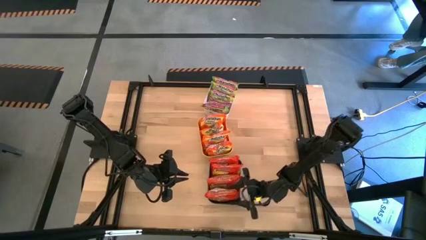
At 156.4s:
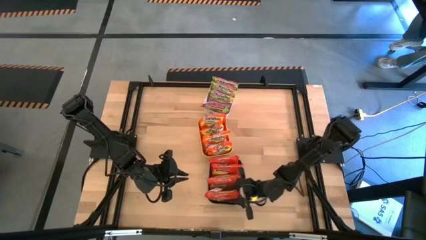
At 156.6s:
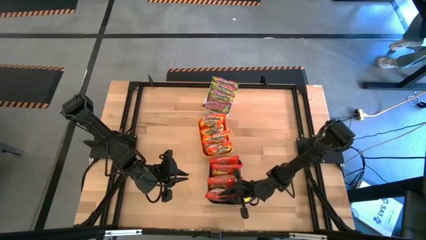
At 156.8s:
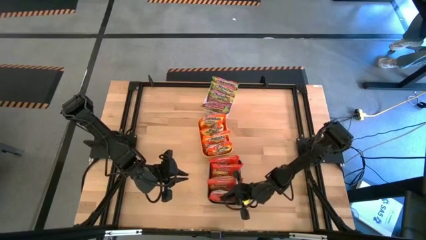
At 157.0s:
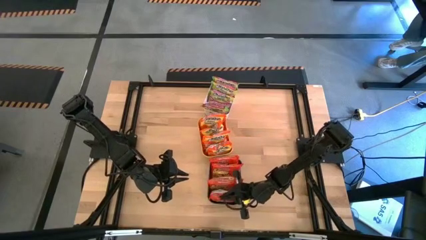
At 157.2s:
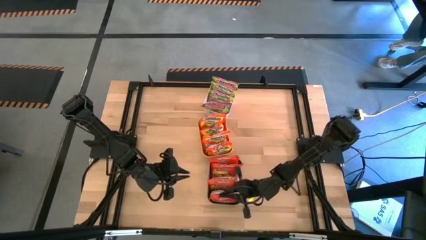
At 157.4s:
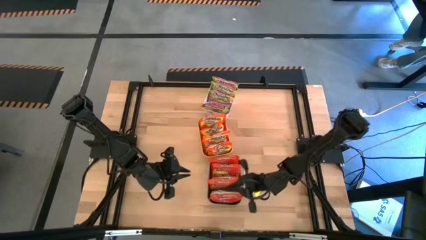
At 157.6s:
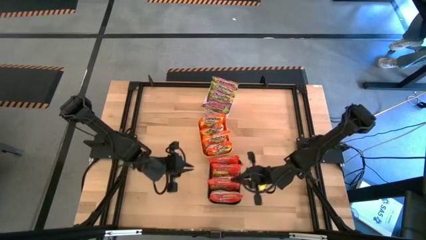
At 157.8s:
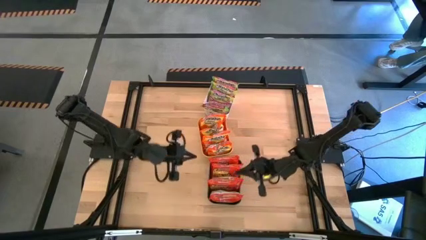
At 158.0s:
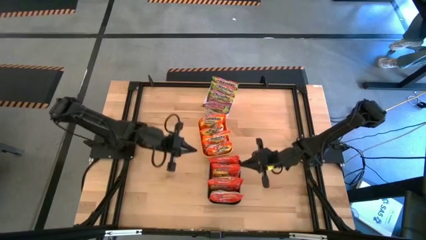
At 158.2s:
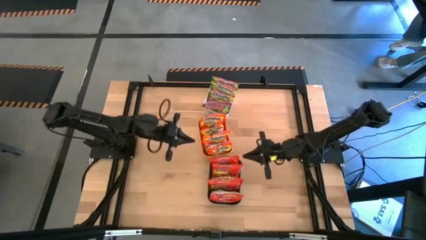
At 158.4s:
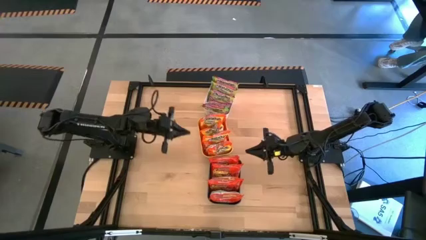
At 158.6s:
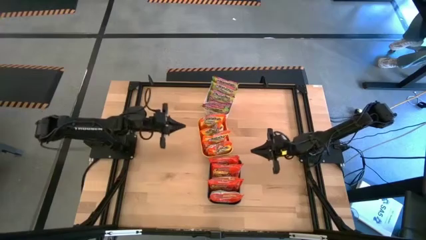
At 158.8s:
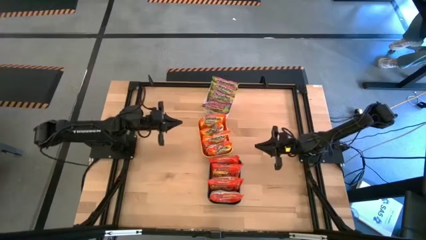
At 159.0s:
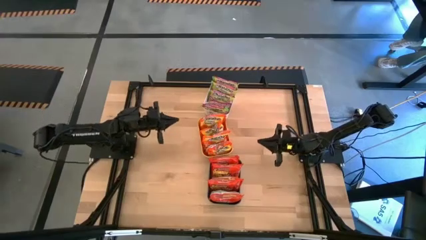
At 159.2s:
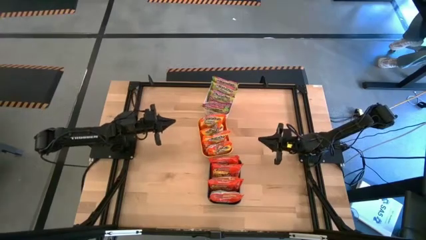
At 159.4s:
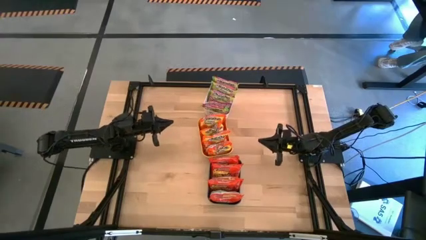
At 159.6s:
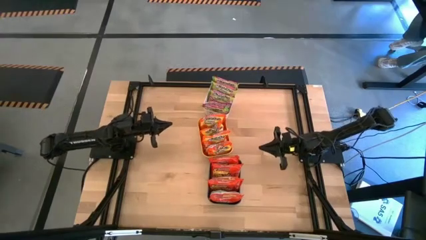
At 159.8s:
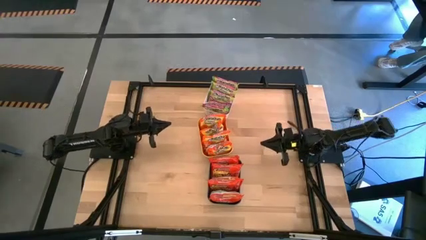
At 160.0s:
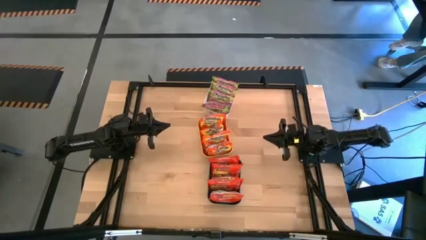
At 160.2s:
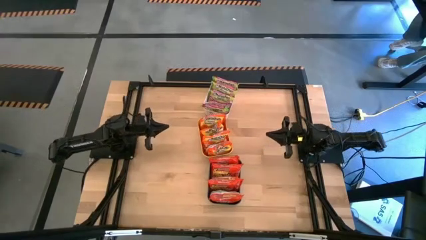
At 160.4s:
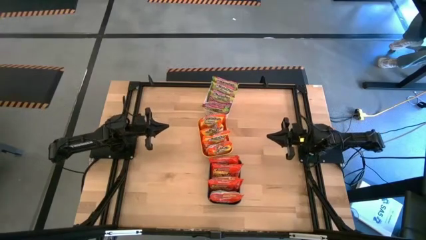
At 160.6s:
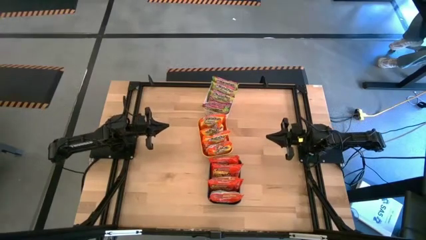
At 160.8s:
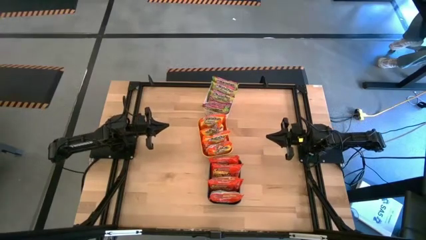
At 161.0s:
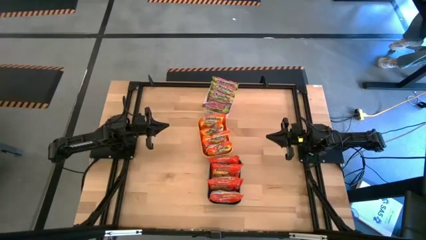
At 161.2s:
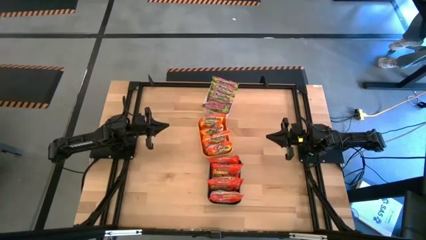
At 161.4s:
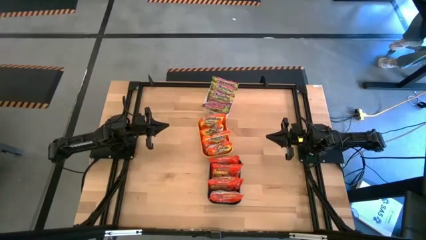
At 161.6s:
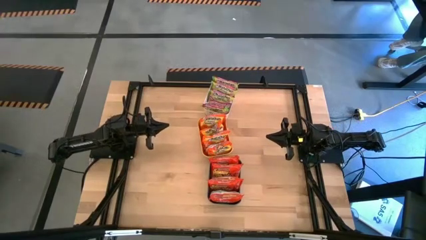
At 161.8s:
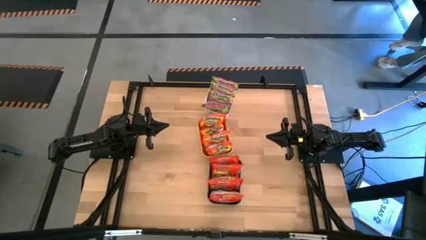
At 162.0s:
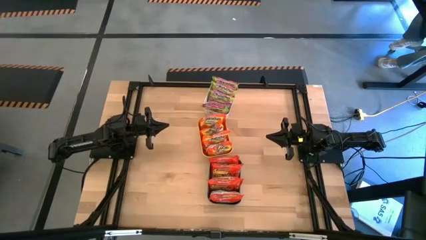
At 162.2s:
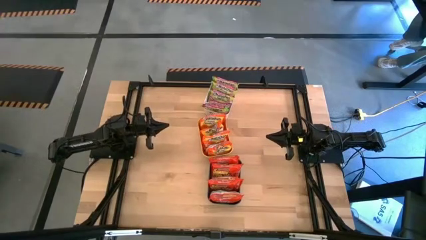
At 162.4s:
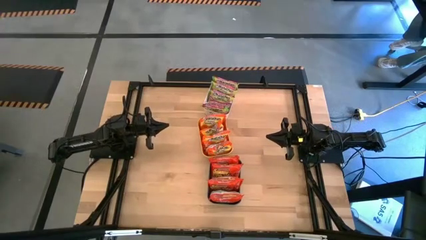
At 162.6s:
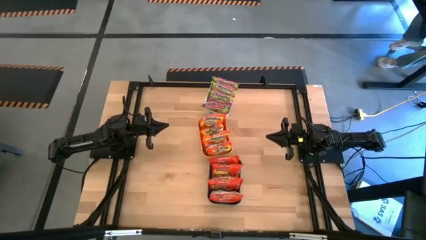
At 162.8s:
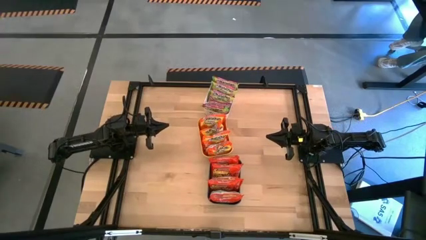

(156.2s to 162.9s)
Task: Sort Maruchan noodles
Return to Home Position

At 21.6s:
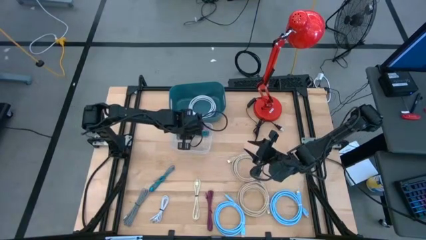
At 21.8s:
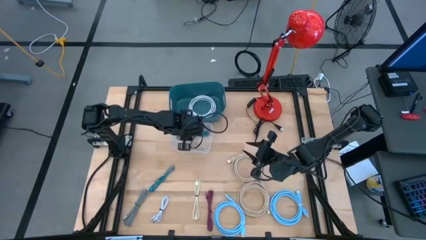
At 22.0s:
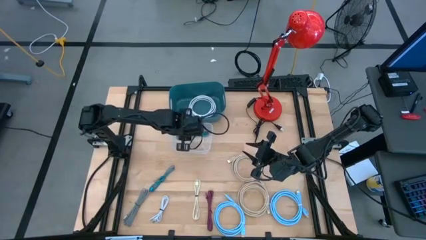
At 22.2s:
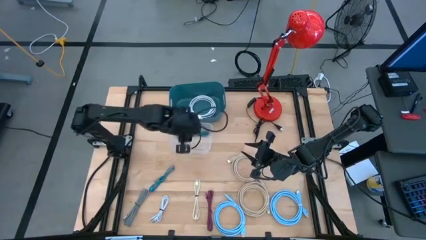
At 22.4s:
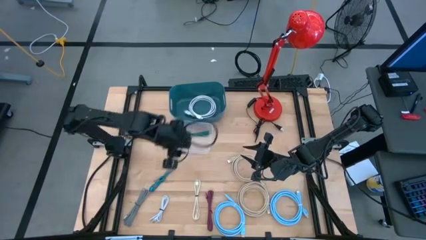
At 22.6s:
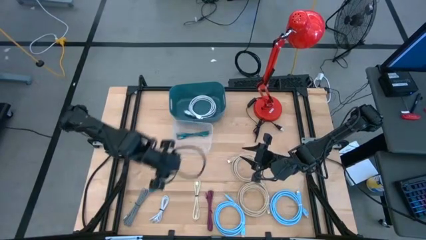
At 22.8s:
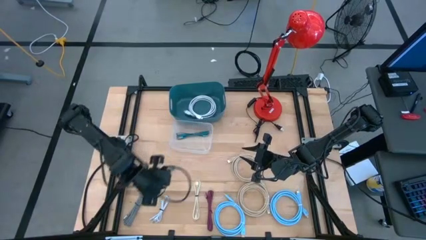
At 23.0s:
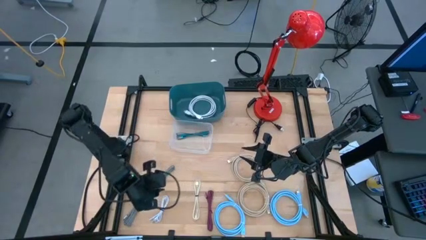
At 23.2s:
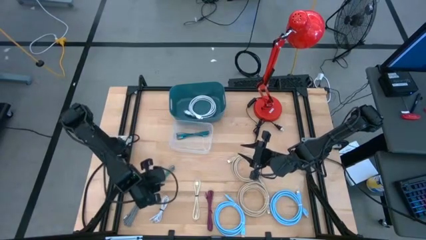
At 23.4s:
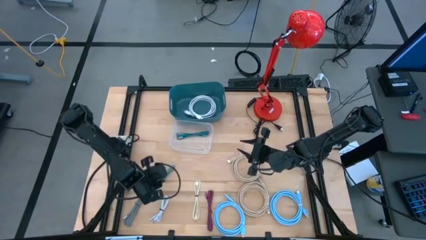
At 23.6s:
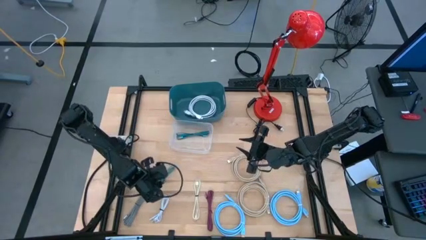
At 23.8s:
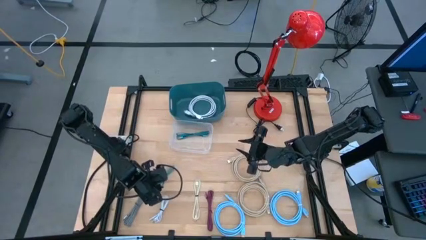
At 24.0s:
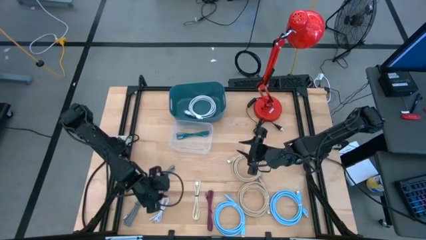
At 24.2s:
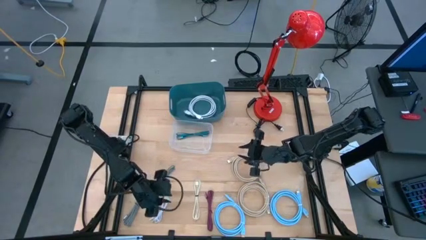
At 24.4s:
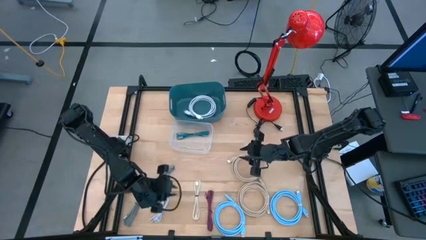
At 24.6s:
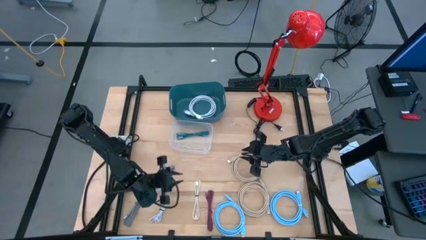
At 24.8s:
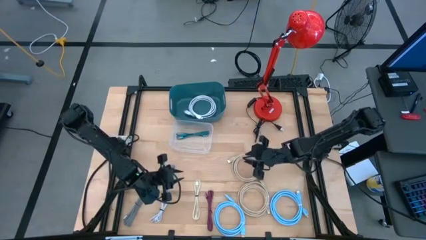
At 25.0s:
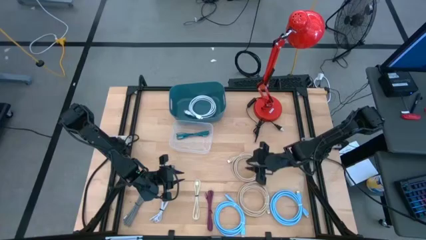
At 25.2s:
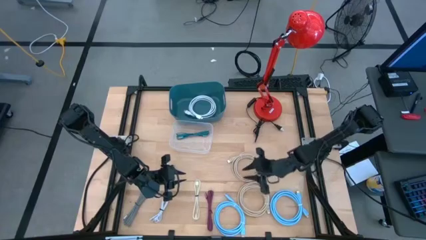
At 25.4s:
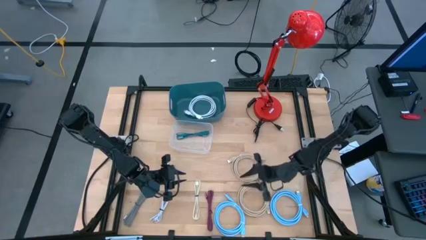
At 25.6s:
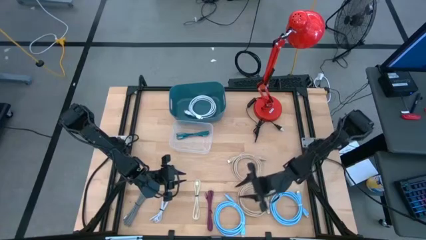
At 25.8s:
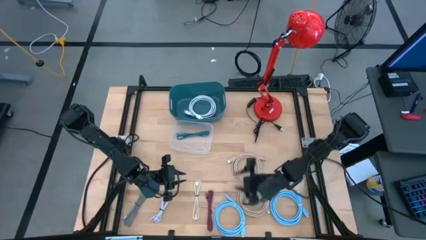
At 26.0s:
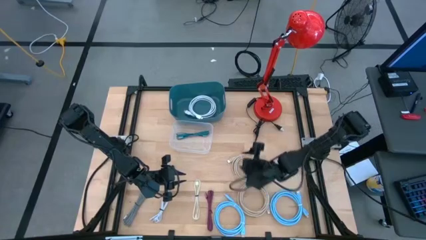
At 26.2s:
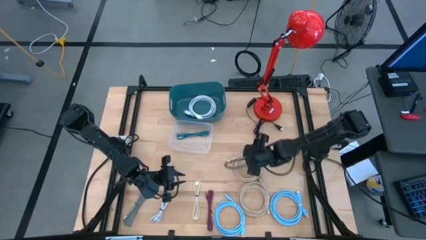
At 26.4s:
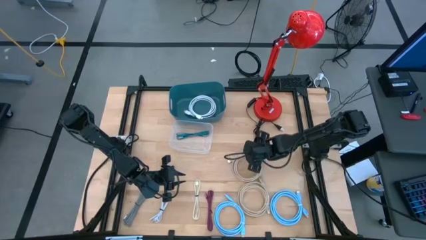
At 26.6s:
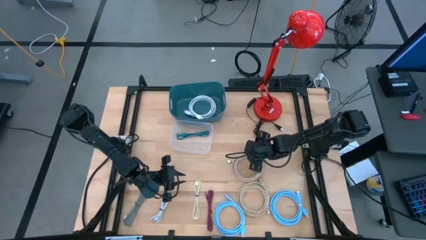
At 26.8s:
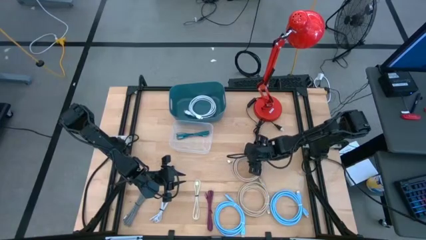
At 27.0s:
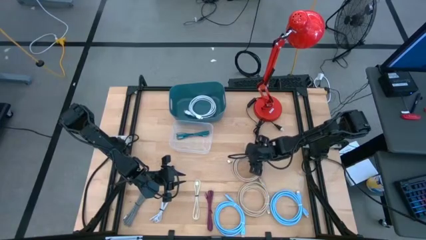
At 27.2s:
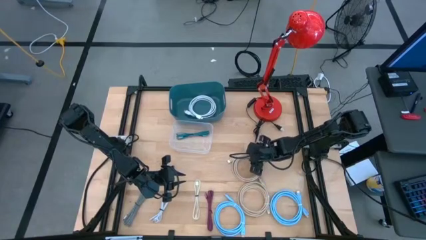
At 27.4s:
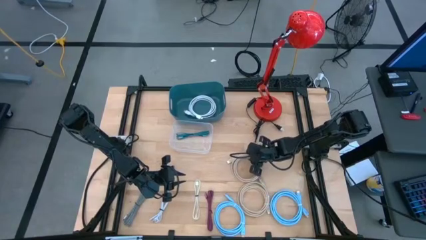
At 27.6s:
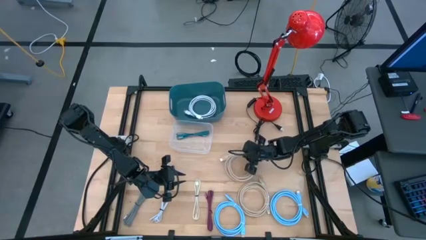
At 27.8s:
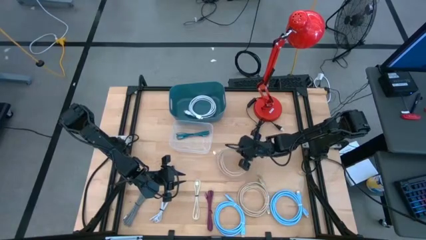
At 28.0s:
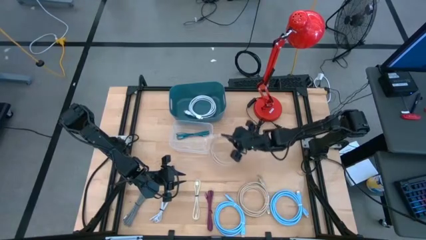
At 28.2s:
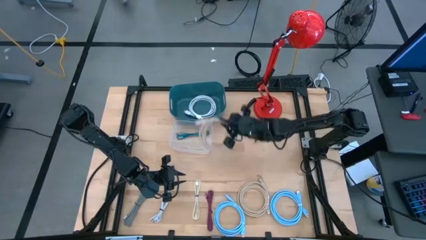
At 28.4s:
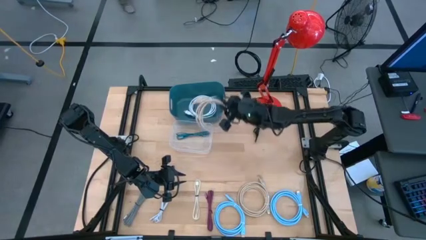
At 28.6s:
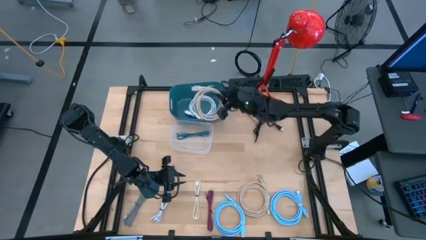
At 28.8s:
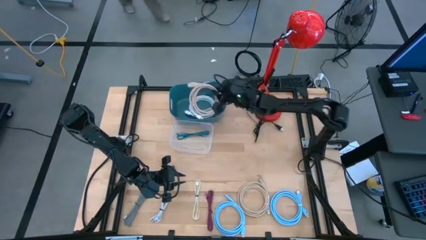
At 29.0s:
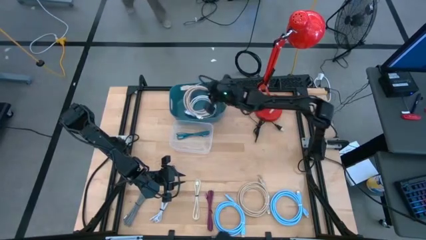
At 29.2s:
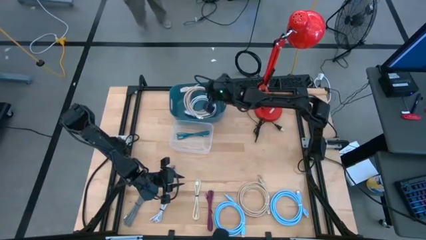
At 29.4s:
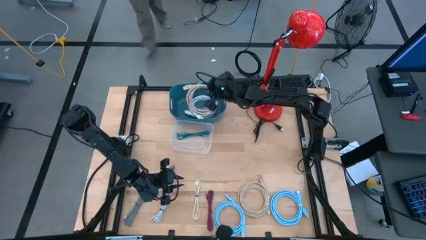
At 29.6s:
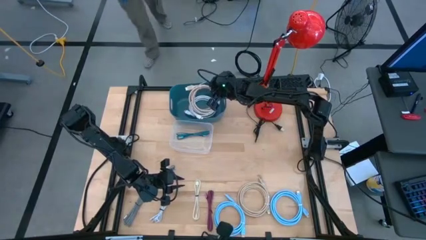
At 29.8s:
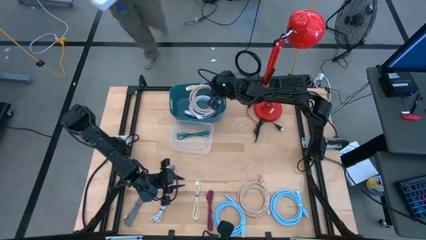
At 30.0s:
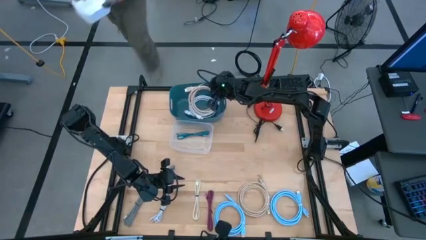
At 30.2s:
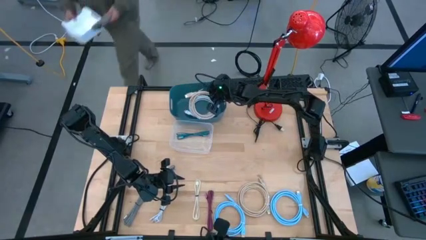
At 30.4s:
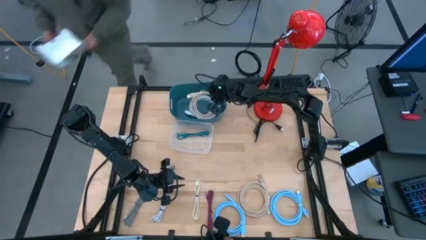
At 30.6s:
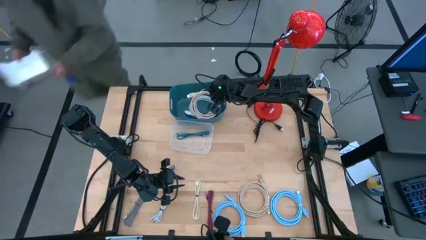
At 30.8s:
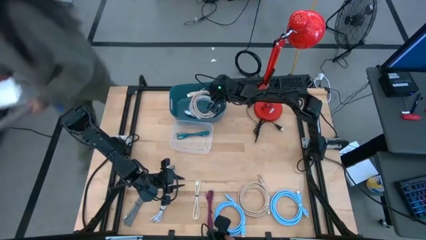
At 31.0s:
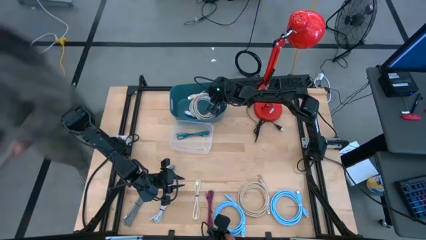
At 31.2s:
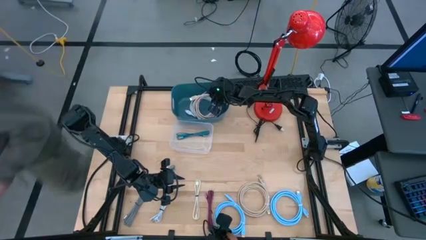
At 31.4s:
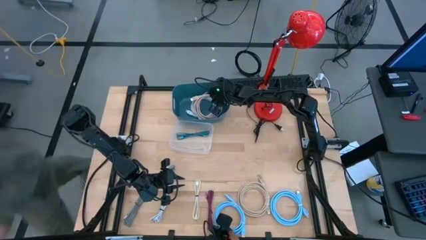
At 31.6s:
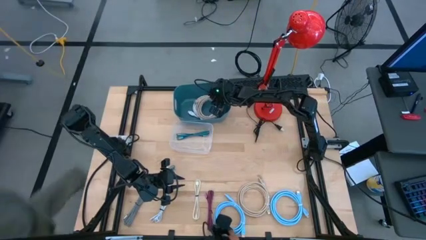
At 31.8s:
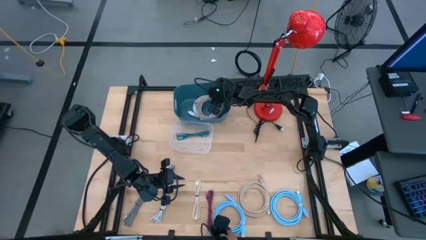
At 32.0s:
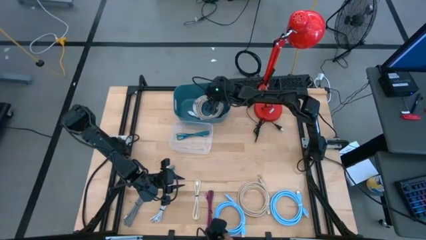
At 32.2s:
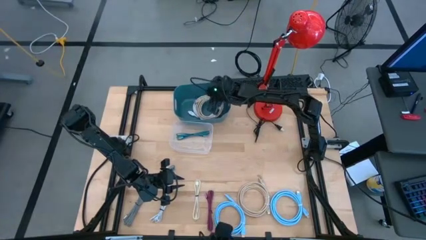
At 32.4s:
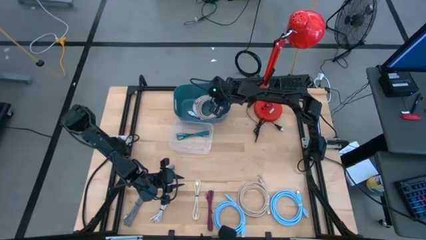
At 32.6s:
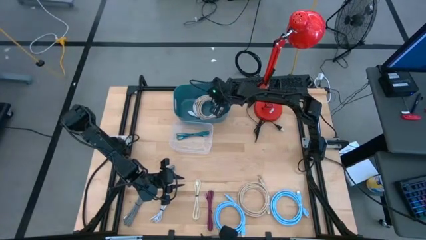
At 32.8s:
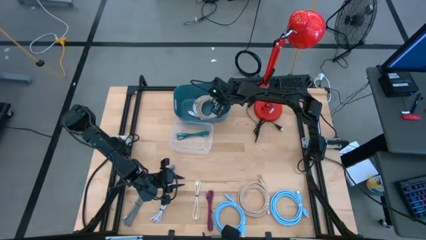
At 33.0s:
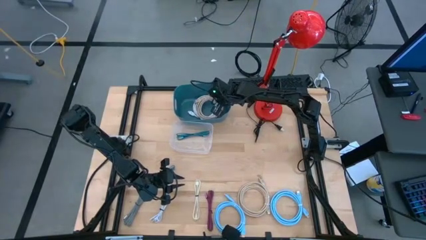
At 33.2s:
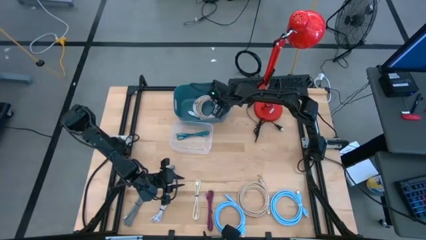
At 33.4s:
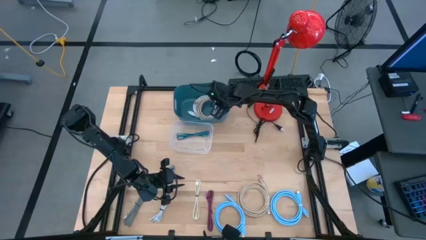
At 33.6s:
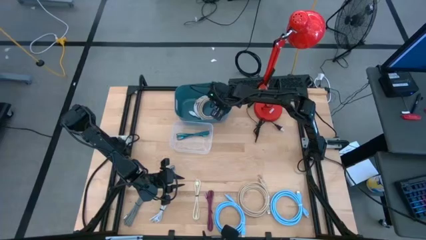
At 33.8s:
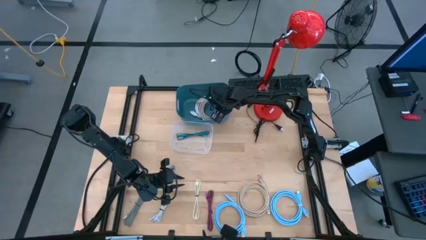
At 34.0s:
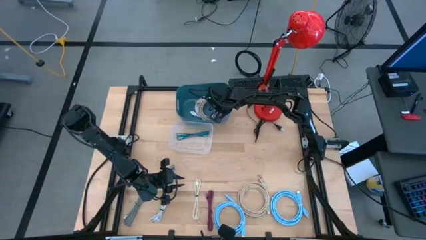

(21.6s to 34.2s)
Task: Pick & Place USB Port
Put the top light brown USB cable into the dark blue bin
